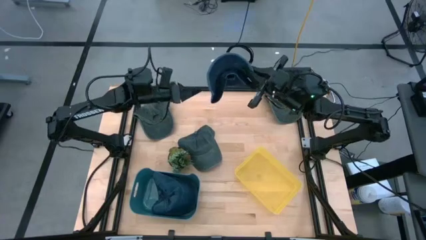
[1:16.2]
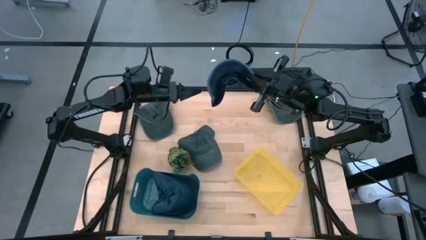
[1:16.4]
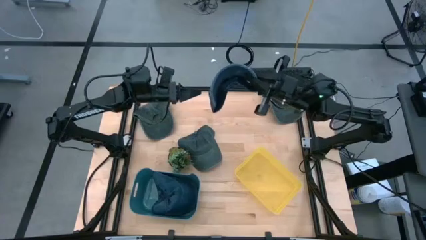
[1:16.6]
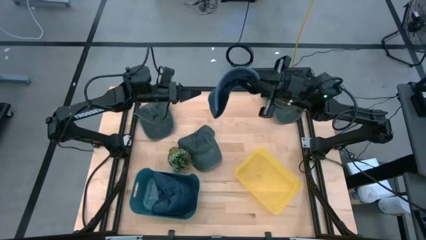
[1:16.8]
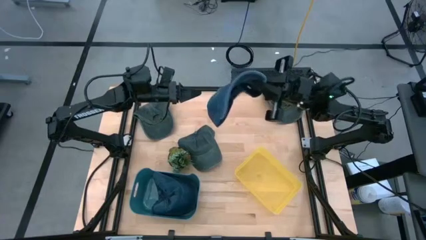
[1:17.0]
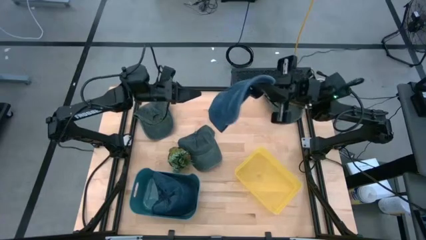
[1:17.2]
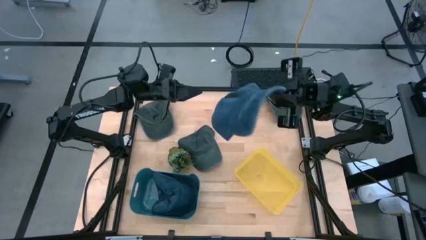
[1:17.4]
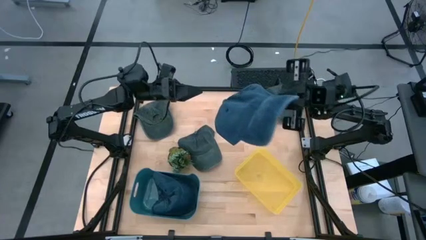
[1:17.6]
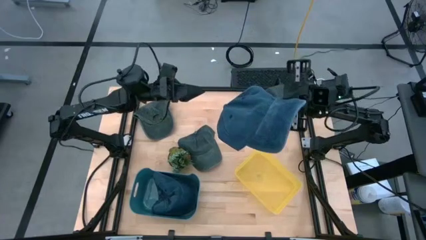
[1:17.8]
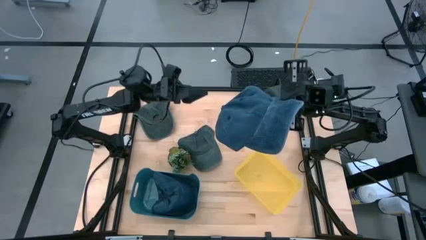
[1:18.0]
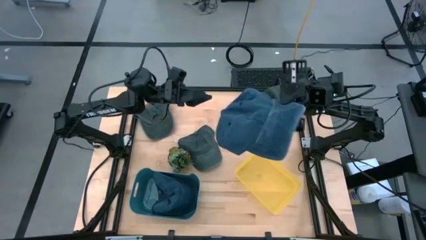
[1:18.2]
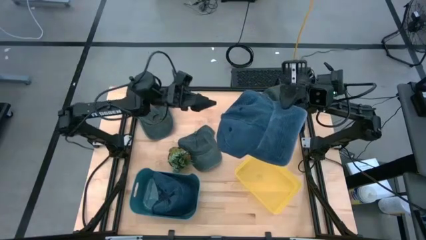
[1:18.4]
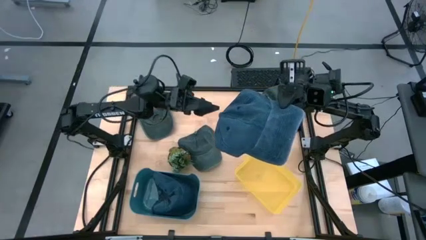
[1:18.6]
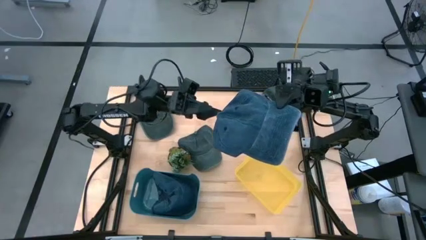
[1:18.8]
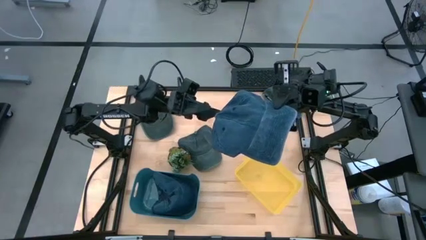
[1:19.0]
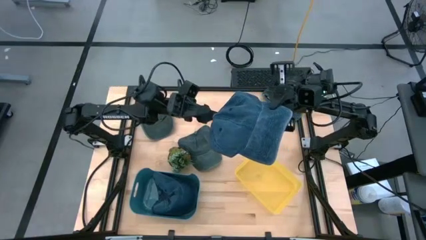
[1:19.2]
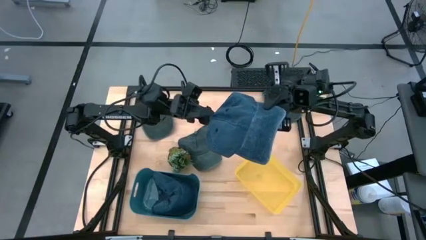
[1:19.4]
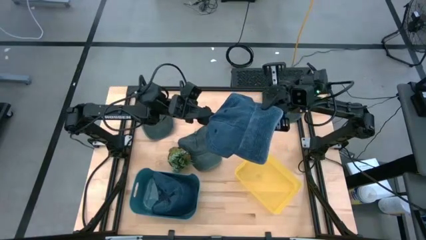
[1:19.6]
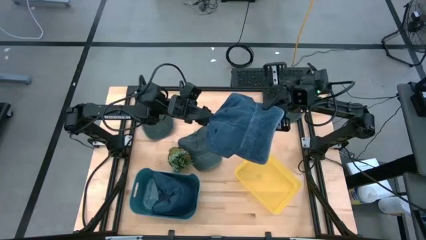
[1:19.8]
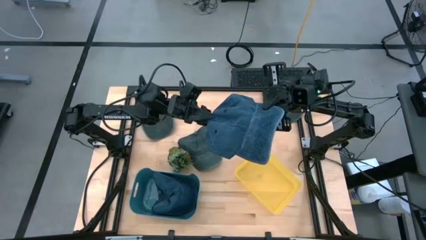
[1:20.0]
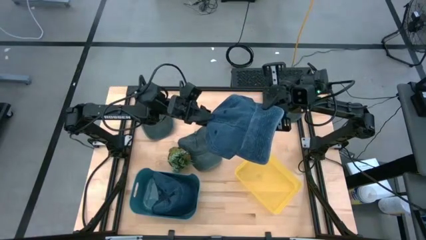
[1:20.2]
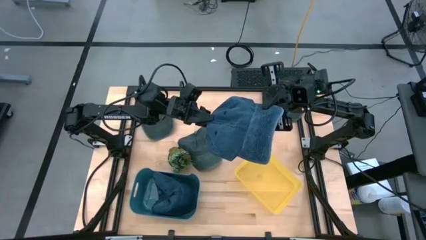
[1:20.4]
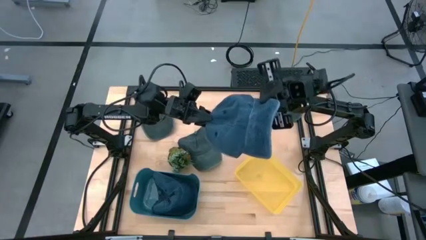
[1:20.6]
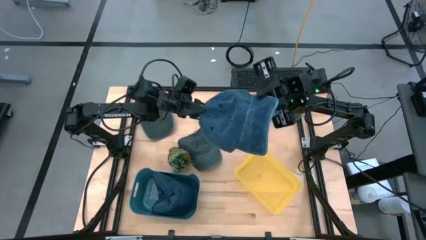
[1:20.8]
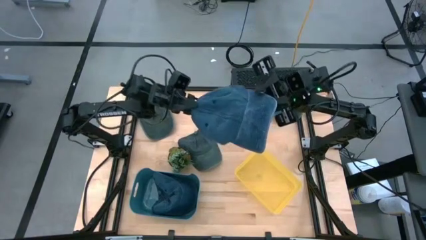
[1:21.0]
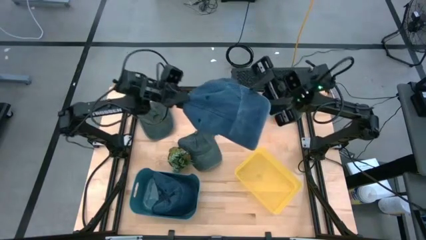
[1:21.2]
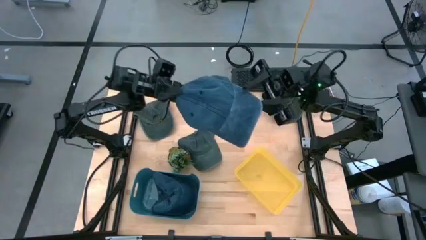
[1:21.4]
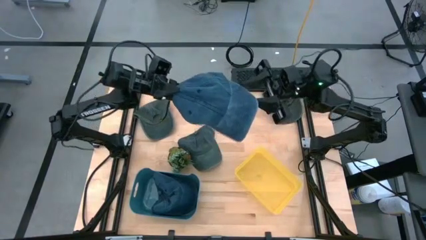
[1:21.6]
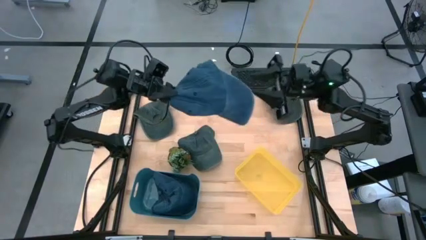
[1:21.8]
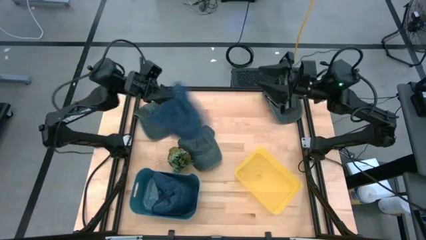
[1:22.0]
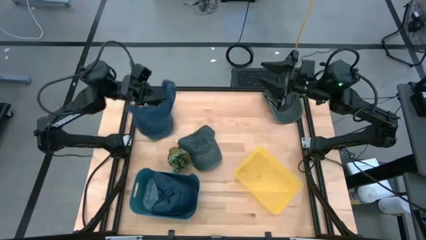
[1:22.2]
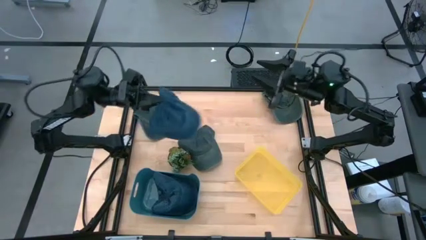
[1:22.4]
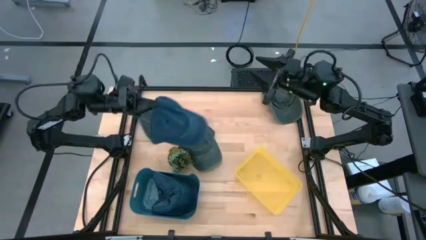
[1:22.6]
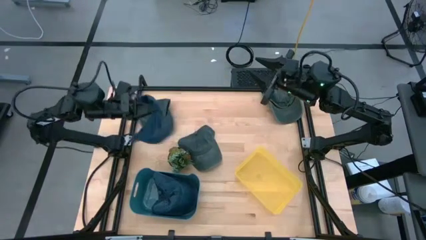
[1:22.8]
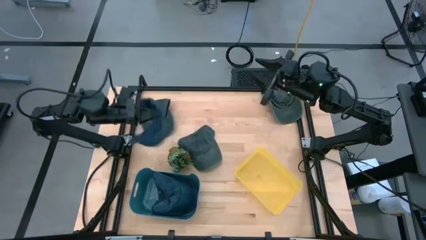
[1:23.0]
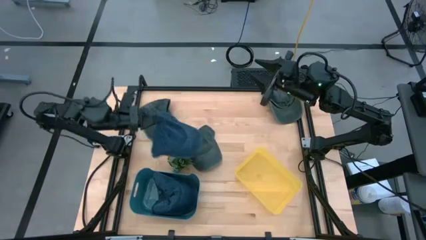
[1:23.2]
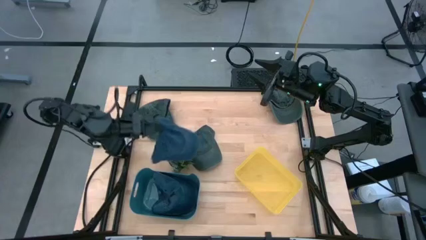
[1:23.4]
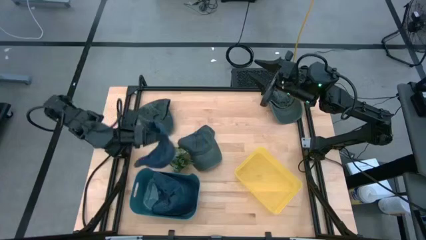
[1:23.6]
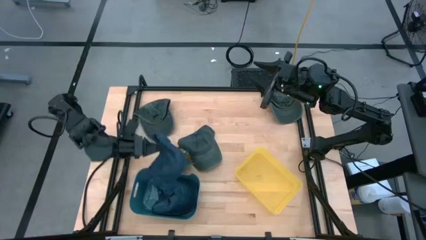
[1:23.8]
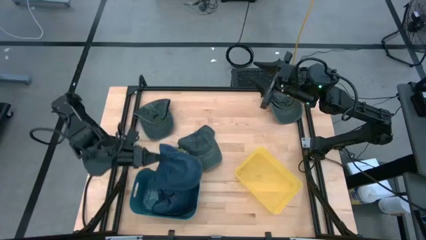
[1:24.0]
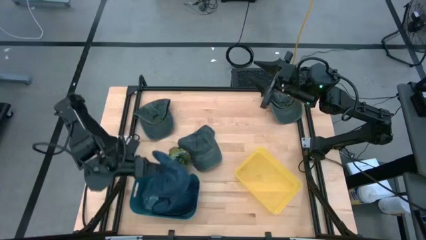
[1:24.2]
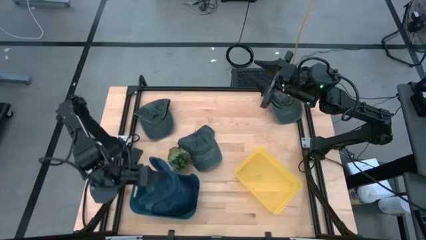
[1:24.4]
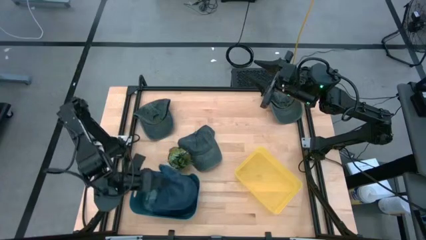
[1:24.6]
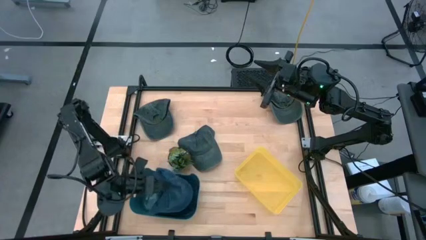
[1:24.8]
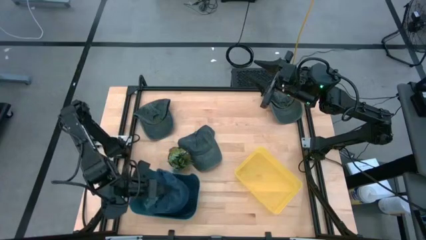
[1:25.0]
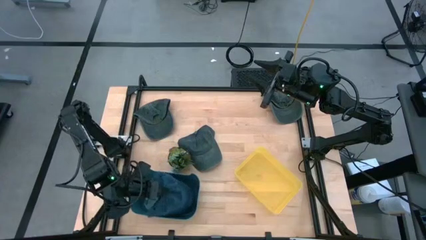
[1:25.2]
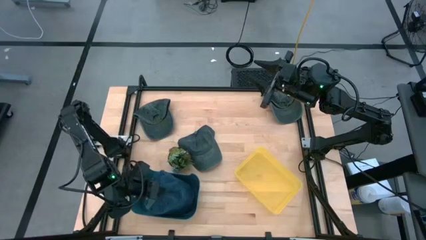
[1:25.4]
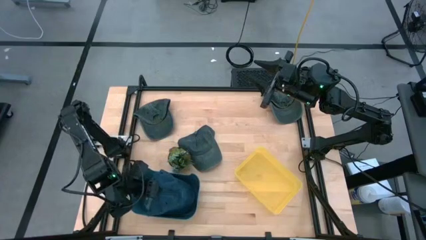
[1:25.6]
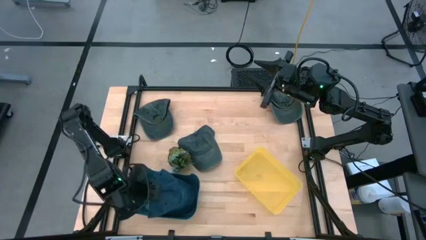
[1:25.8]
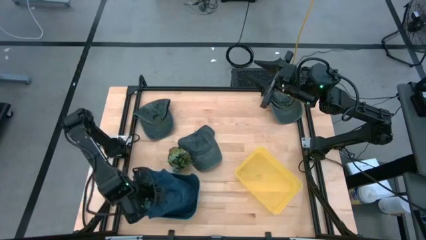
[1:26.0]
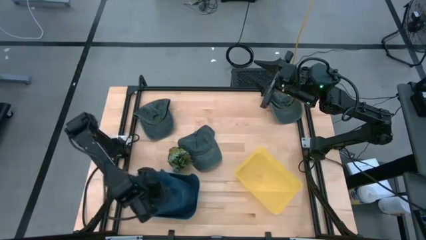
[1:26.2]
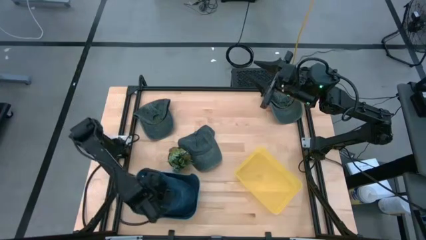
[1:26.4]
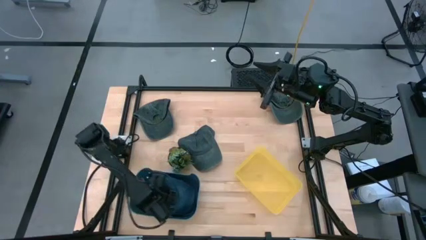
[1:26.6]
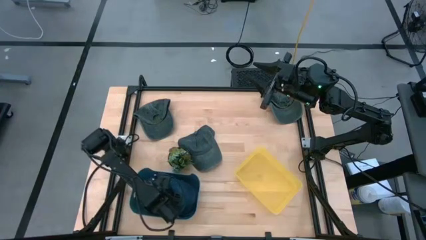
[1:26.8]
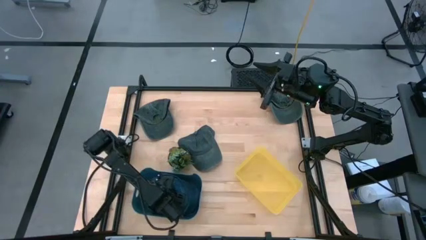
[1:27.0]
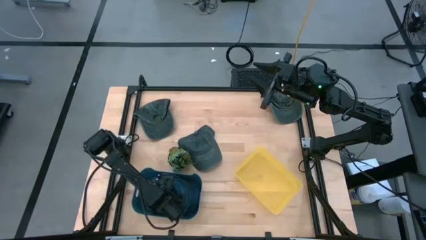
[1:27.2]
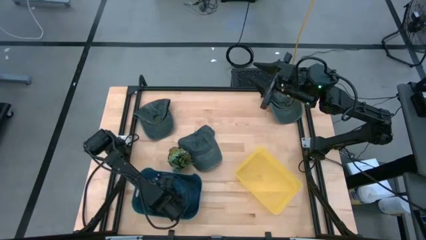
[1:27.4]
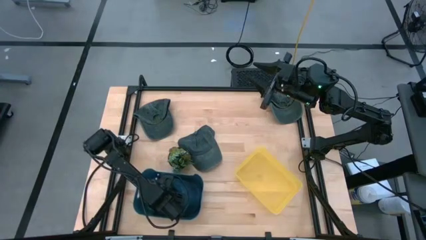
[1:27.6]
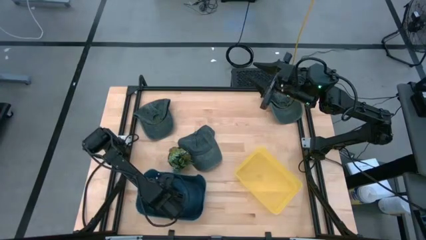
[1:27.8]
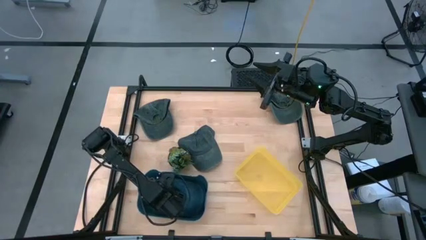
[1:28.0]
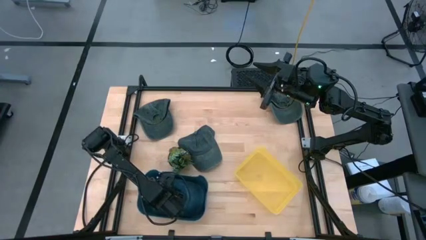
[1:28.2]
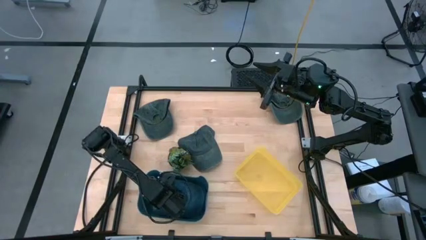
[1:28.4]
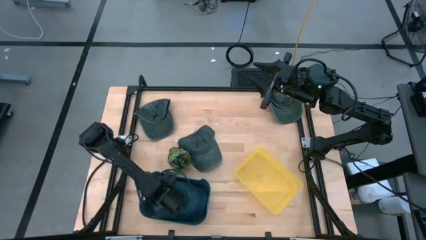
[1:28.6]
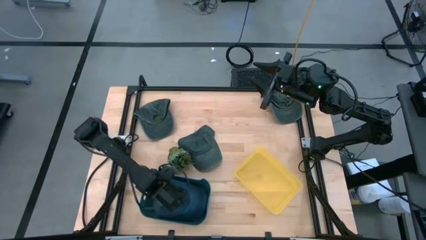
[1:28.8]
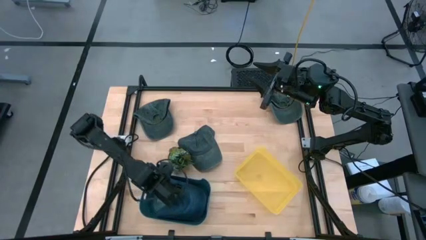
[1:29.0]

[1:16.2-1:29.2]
Task: Pick & Place hat
Put the blue cap into the blue bin
